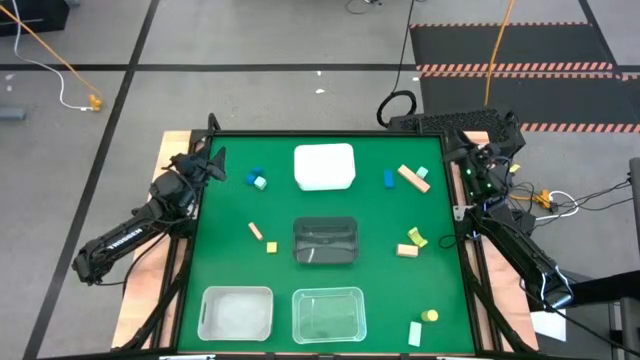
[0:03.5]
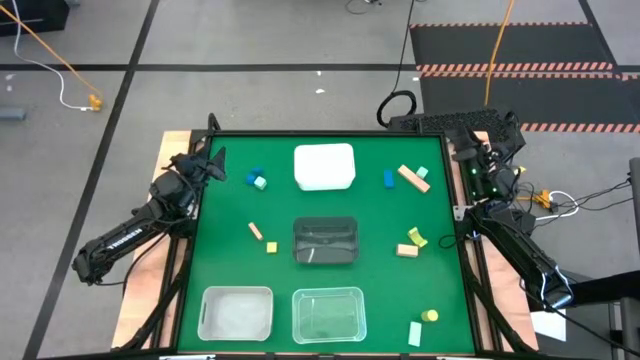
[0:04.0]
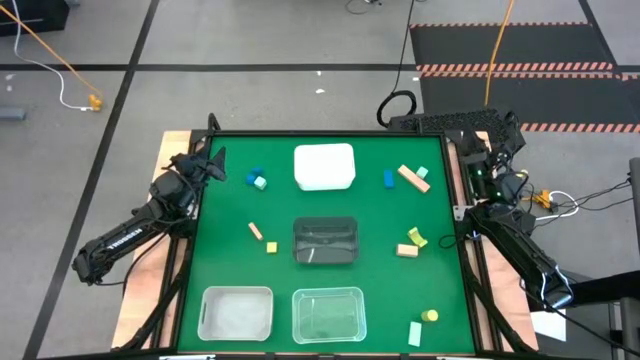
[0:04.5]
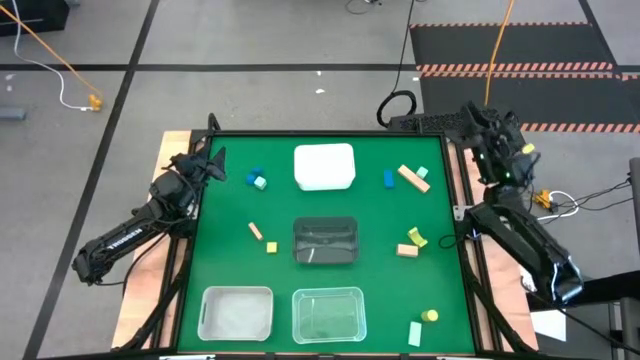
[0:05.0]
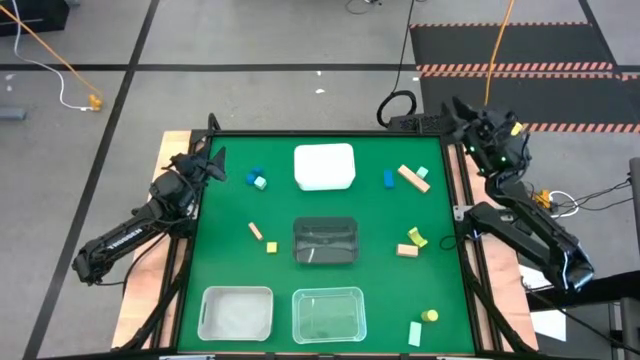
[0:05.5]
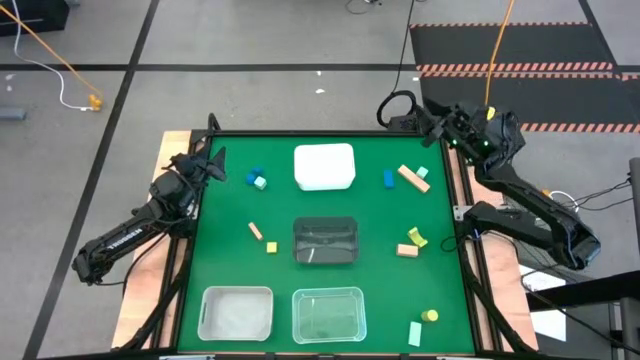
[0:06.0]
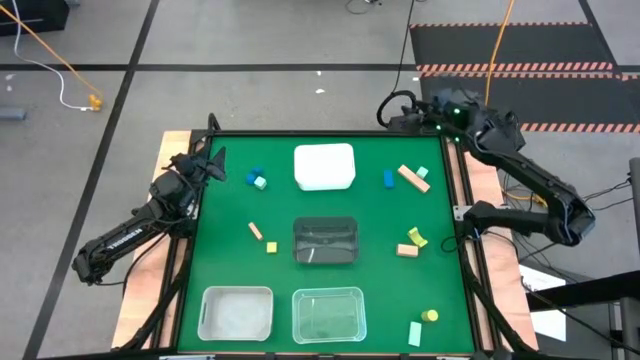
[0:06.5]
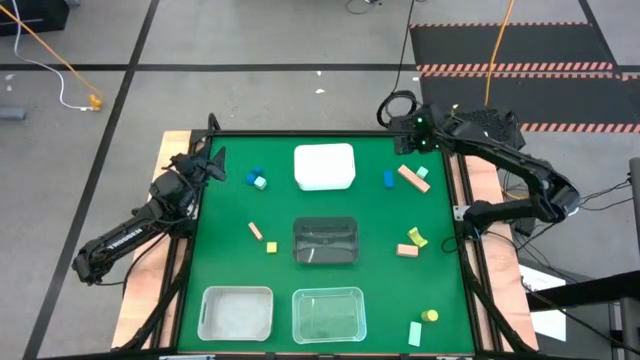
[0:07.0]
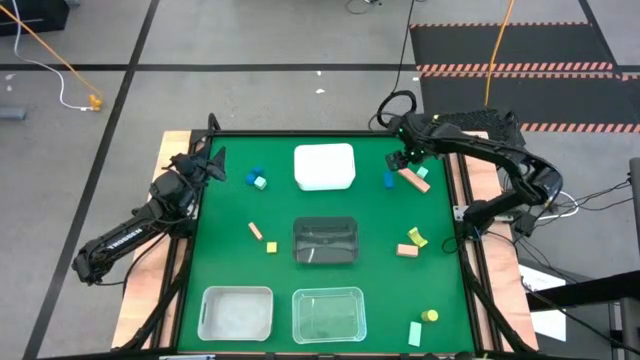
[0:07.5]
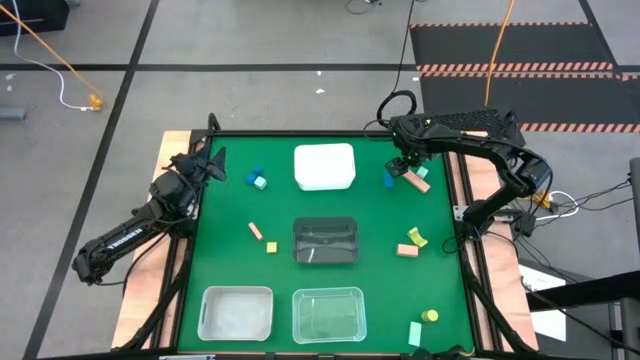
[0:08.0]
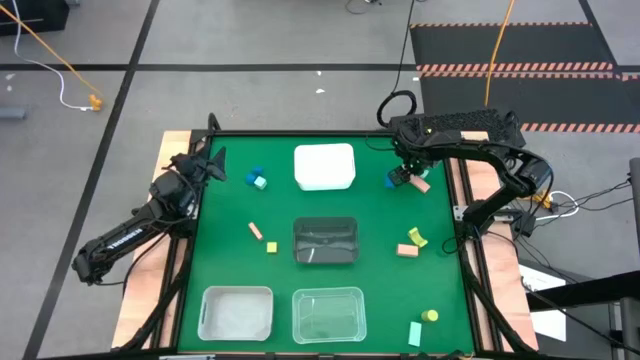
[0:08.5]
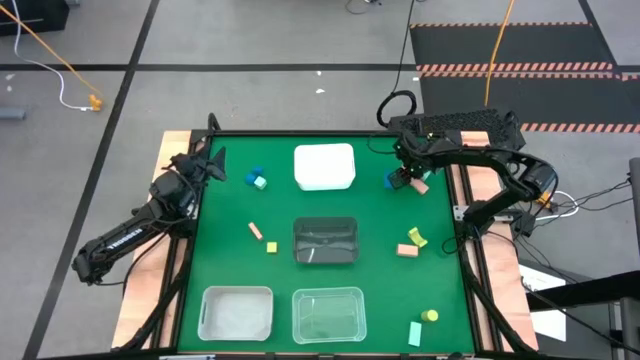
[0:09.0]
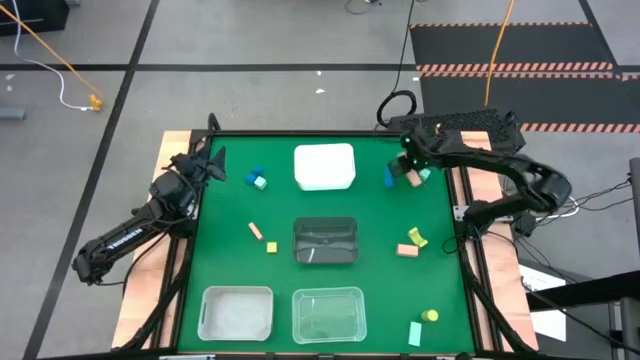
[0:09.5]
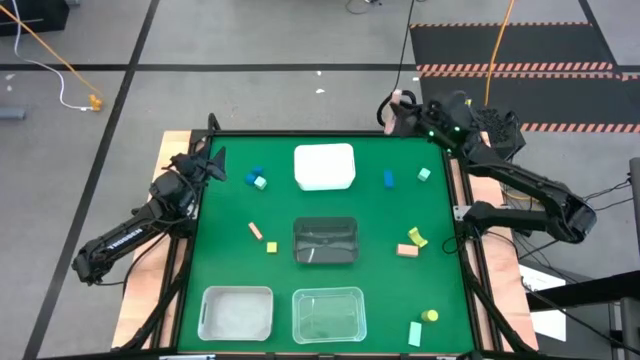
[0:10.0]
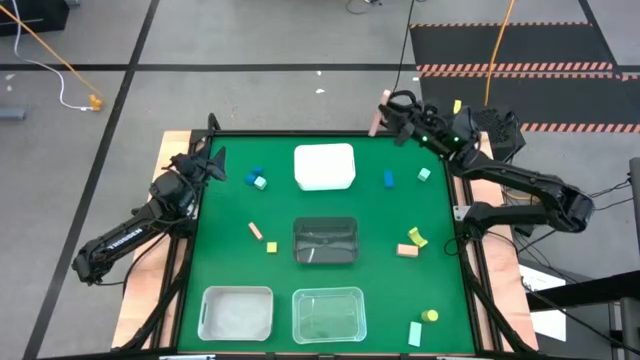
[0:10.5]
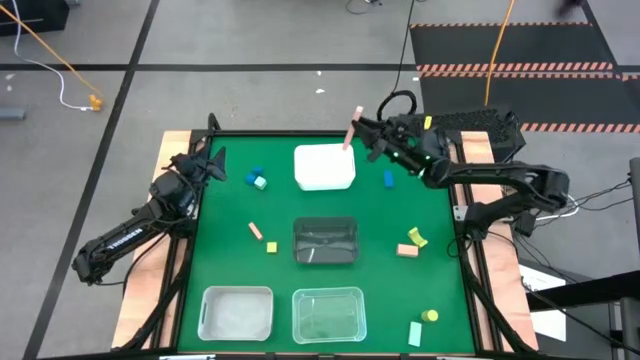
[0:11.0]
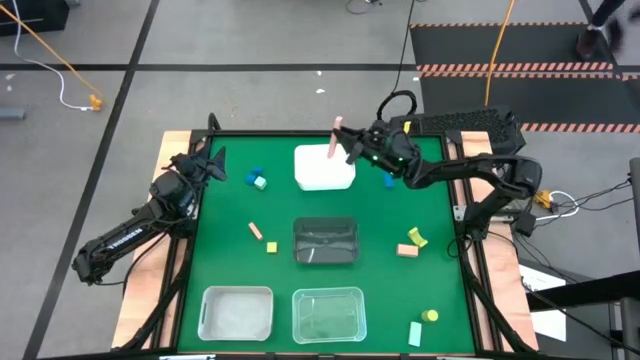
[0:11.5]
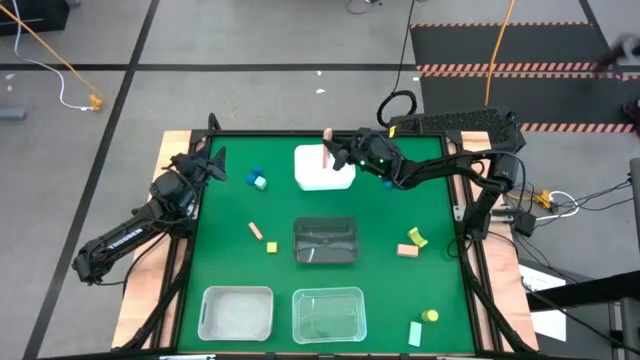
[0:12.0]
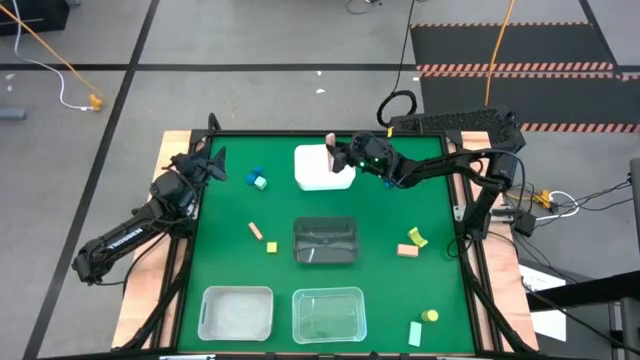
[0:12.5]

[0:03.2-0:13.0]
Task: Sort & place blocks by color
Put the top right brown block into the white bin

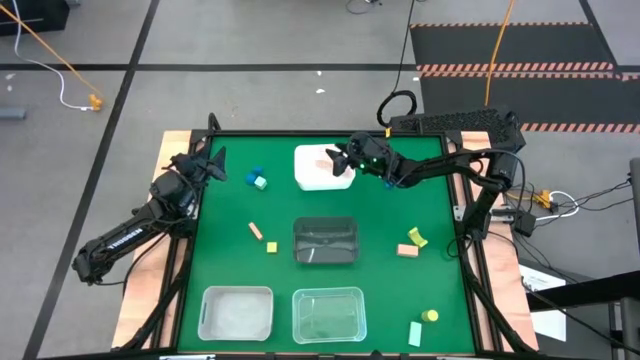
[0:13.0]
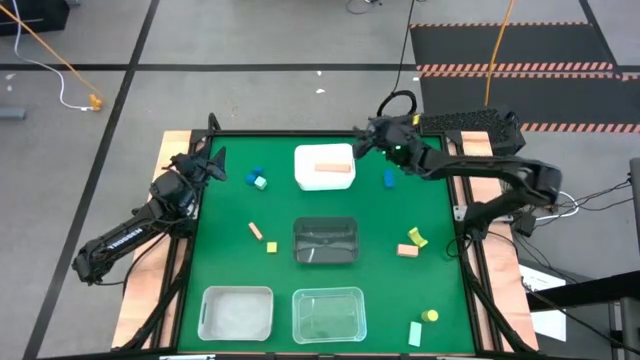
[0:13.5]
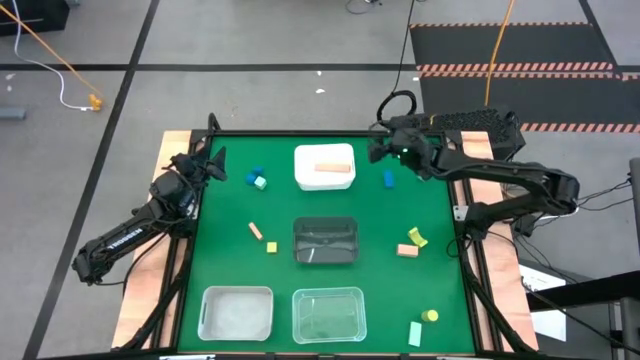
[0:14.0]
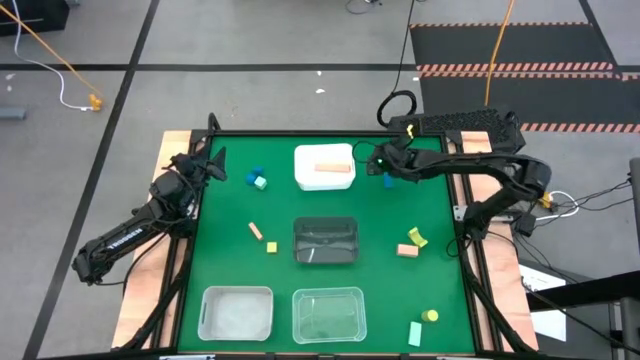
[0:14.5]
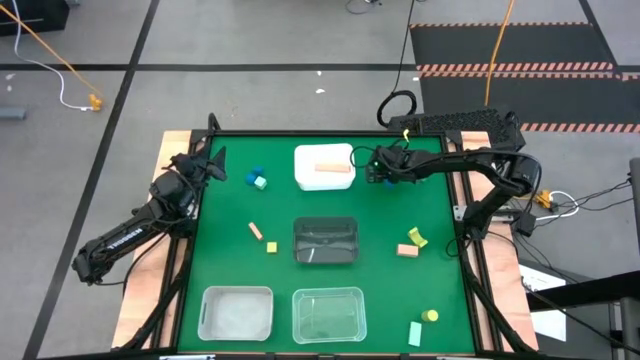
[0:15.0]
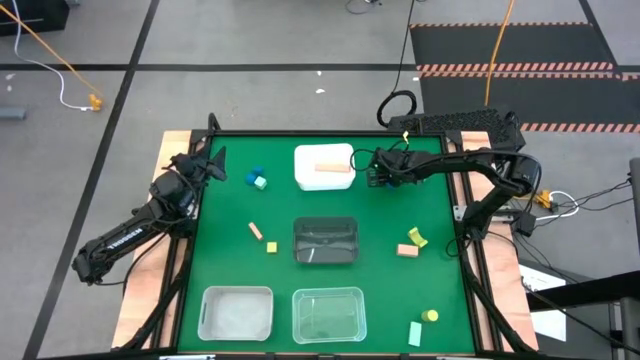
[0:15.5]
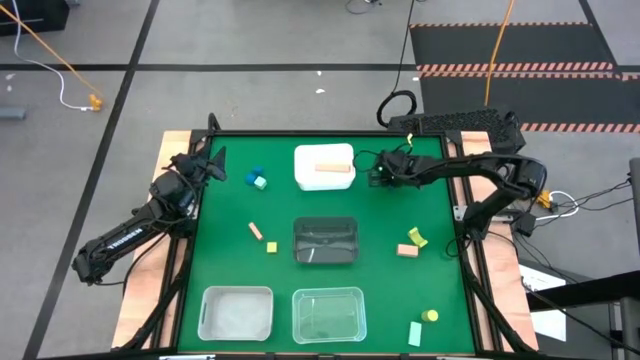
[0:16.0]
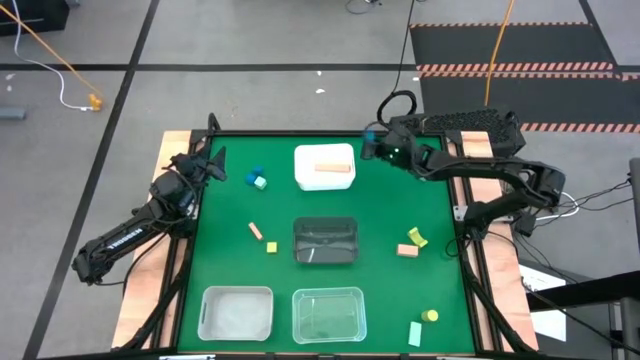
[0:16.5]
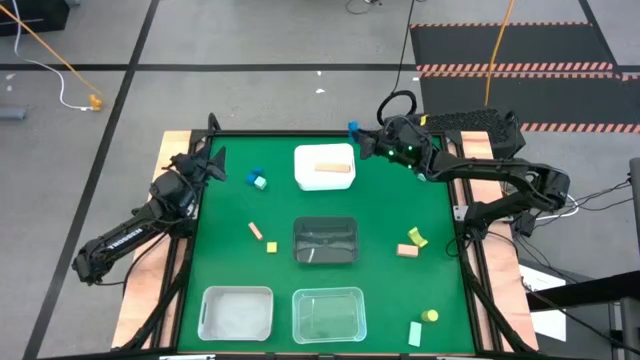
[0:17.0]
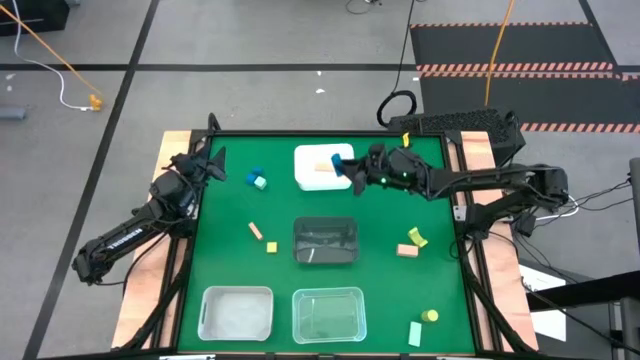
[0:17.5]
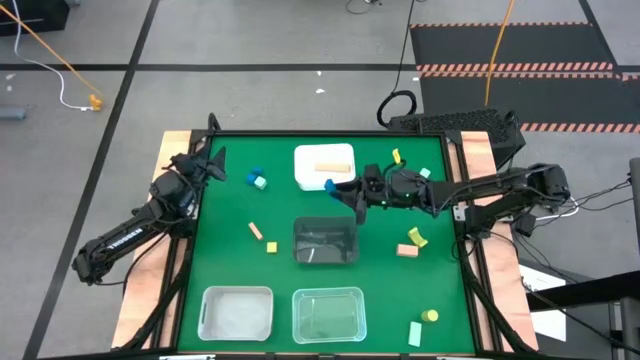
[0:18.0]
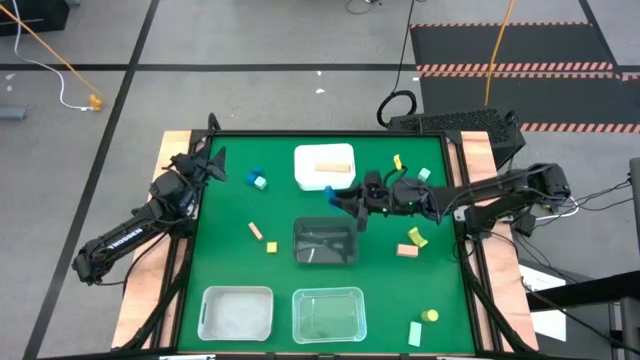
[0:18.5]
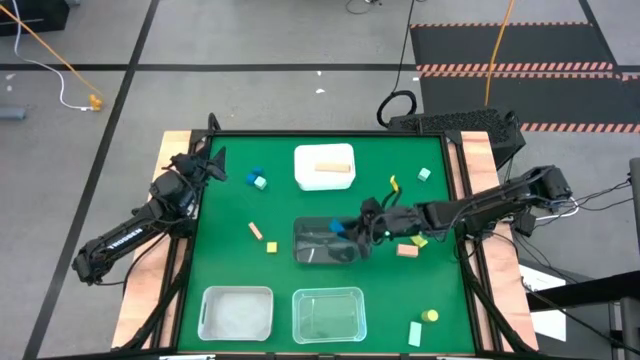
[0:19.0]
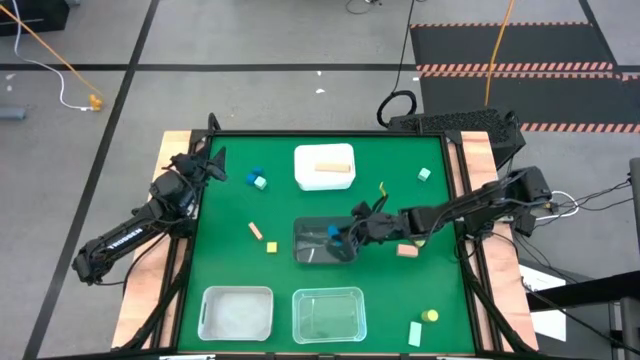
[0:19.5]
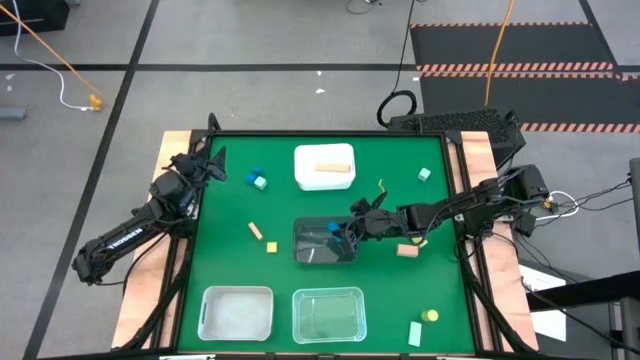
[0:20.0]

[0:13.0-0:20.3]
Put the right blue block into the black bin

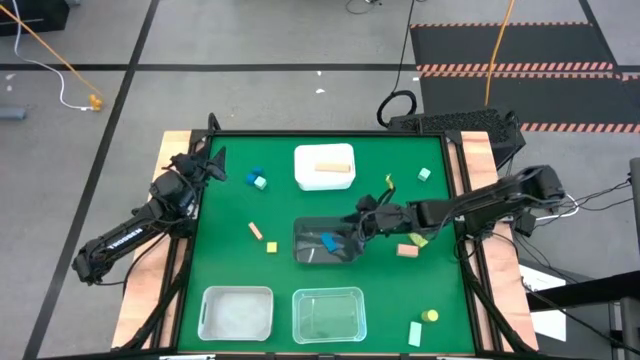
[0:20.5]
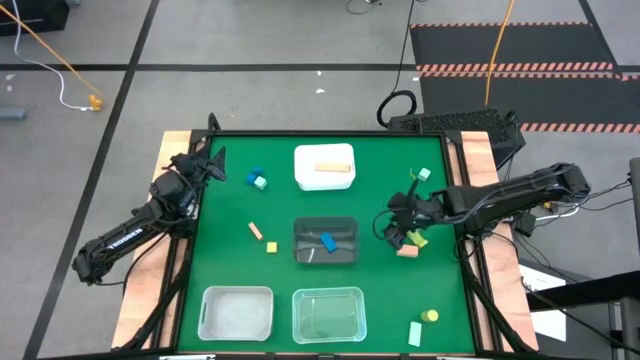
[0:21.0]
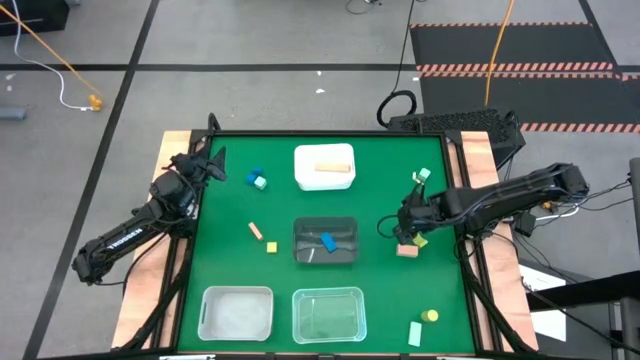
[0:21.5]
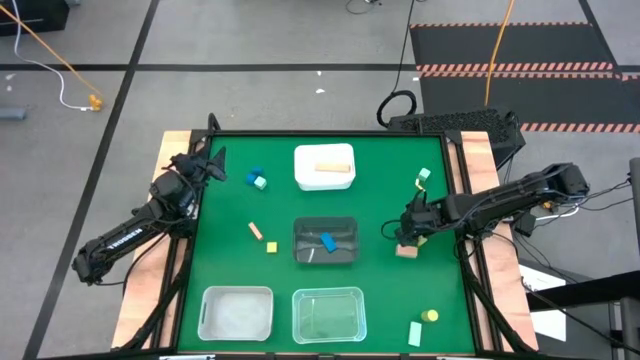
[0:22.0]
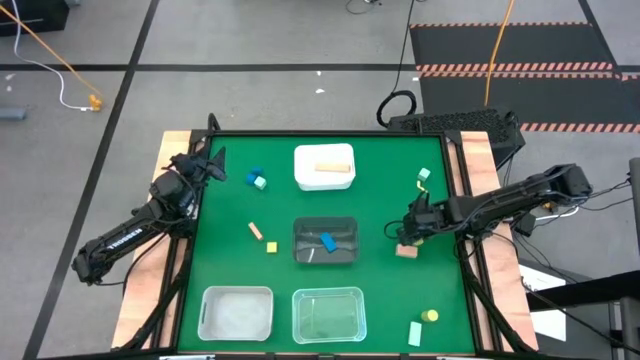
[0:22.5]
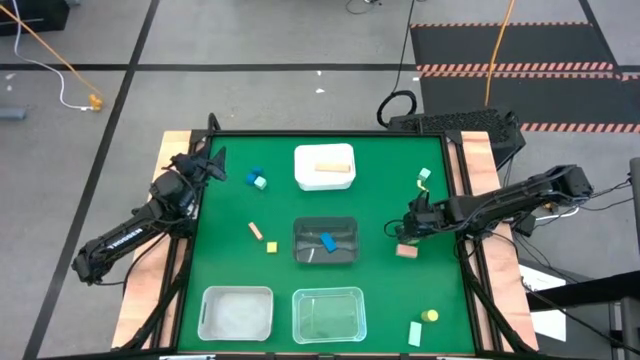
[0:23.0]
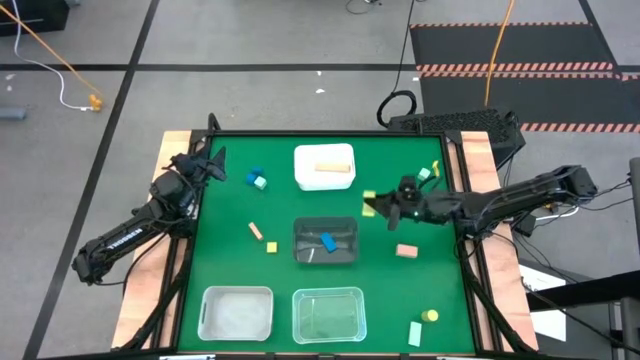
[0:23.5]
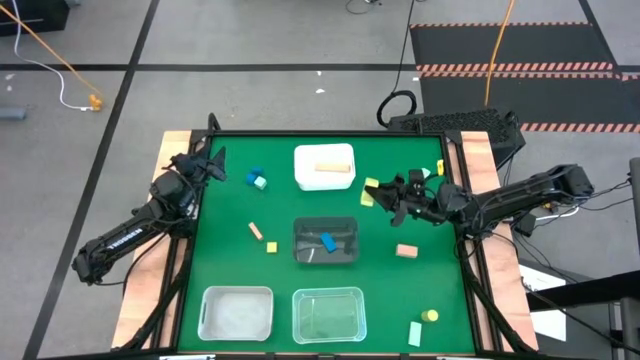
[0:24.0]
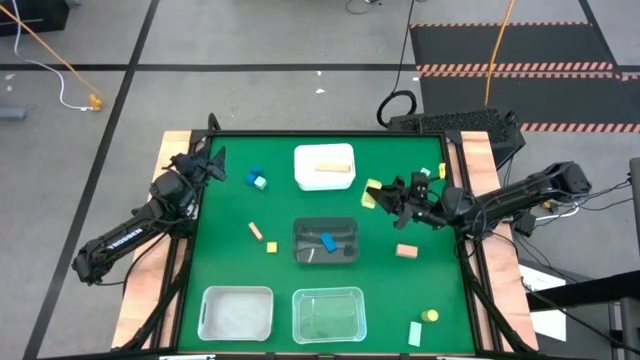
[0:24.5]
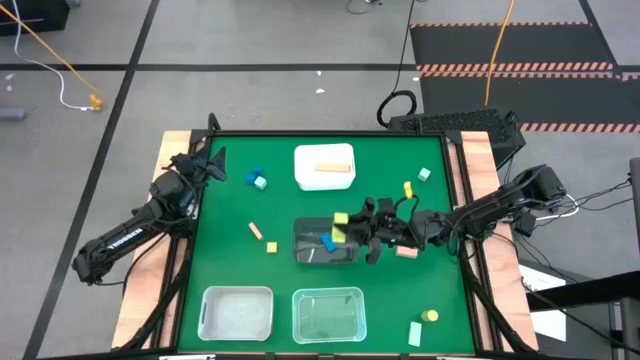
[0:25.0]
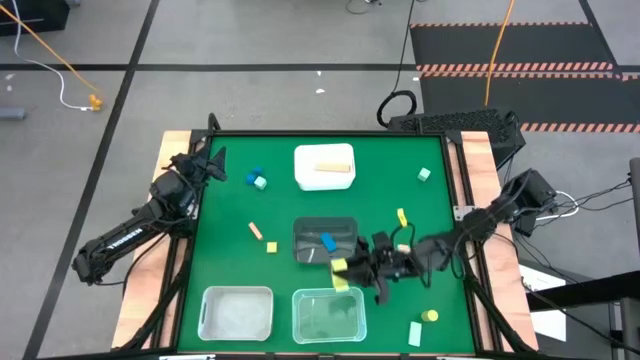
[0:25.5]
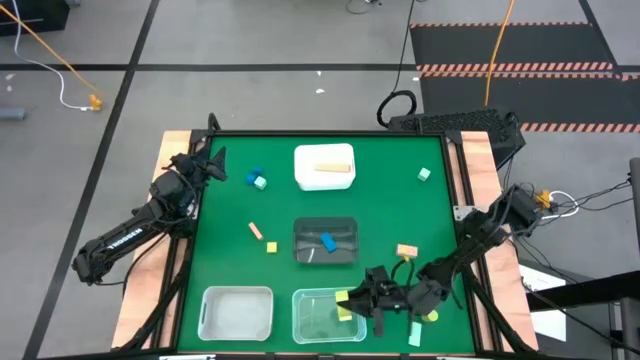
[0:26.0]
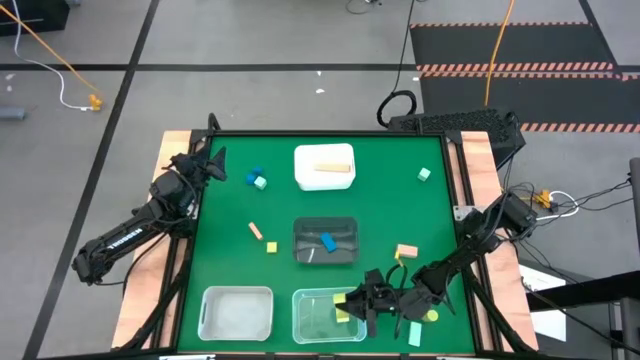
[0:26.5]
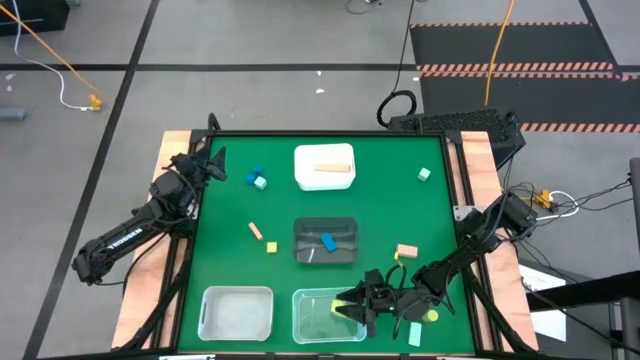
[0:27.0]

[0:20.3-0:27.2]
Put the top right green block into the transparent bin
